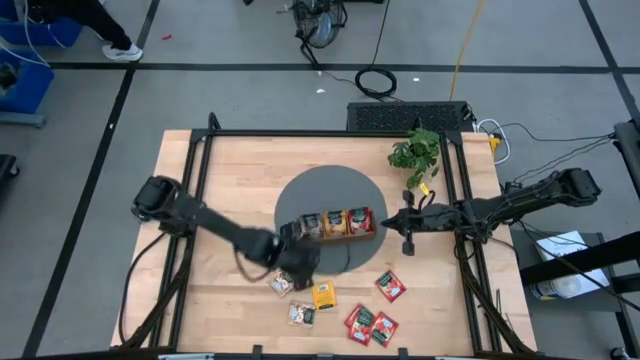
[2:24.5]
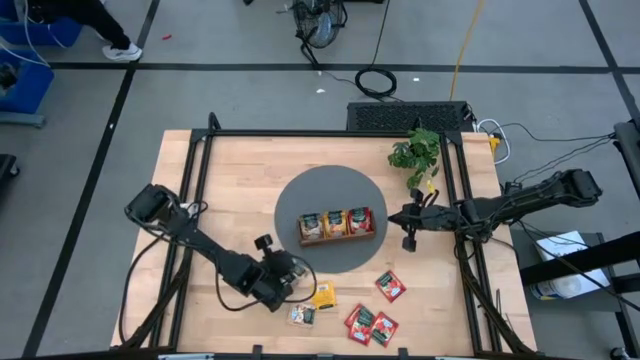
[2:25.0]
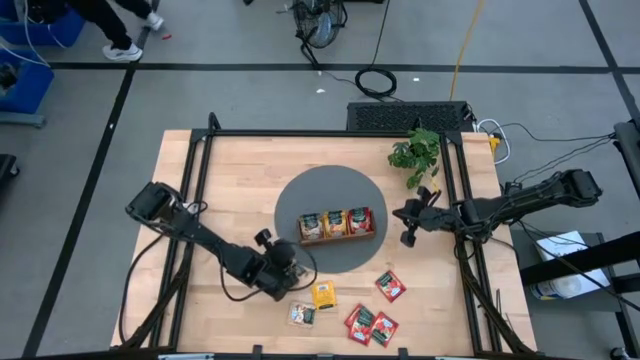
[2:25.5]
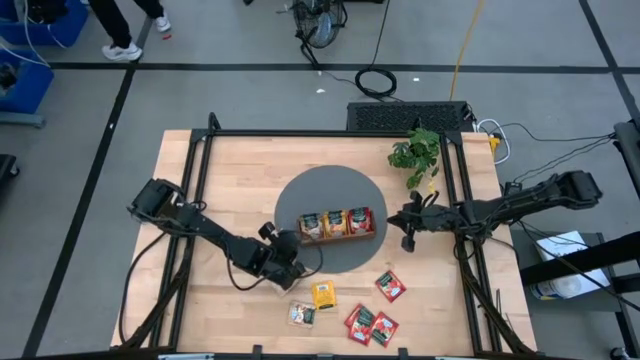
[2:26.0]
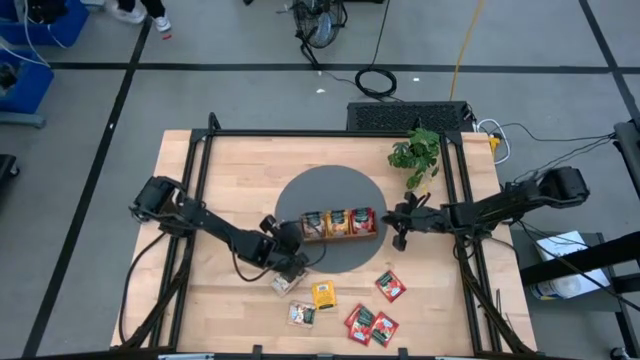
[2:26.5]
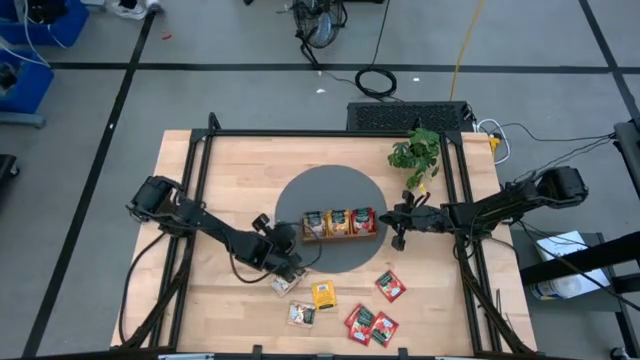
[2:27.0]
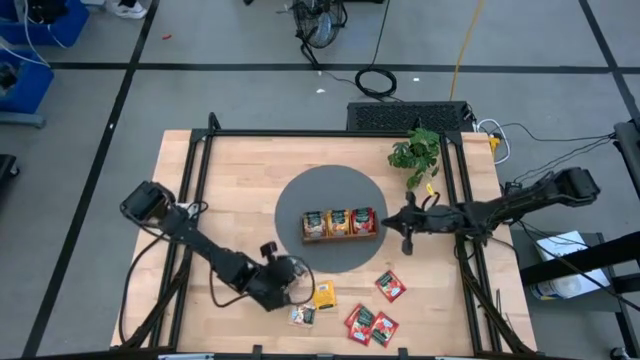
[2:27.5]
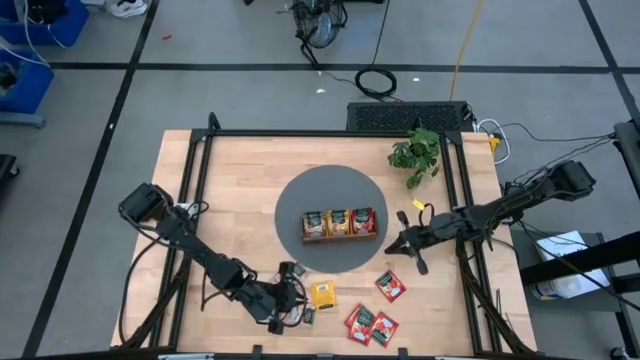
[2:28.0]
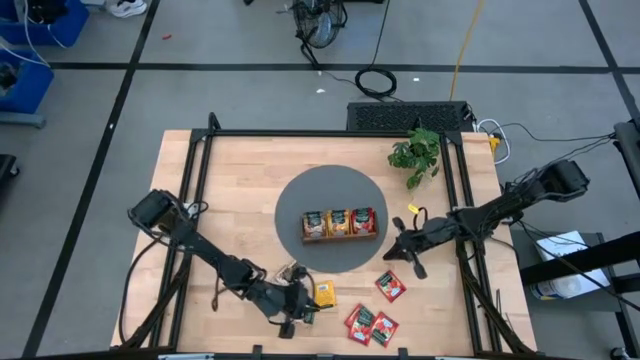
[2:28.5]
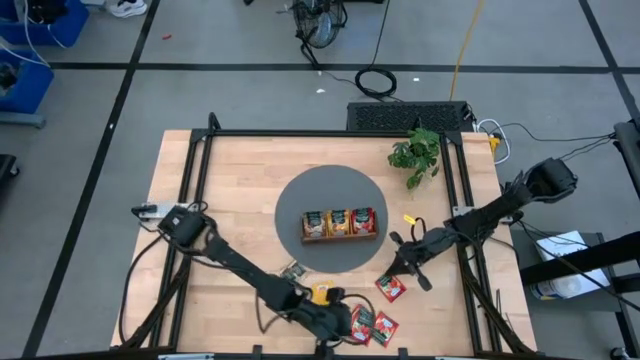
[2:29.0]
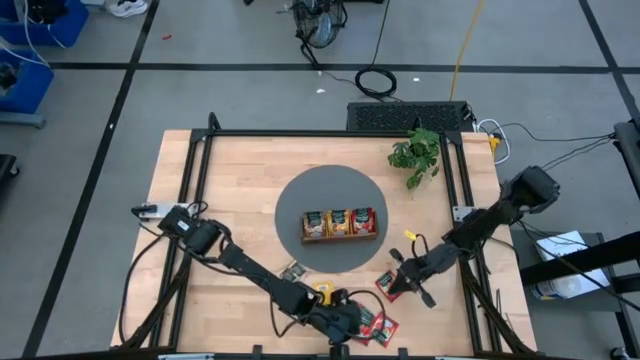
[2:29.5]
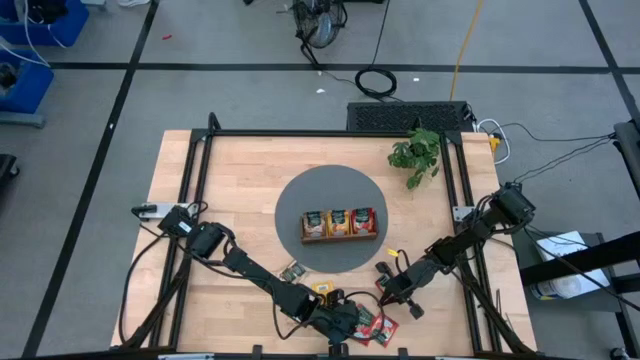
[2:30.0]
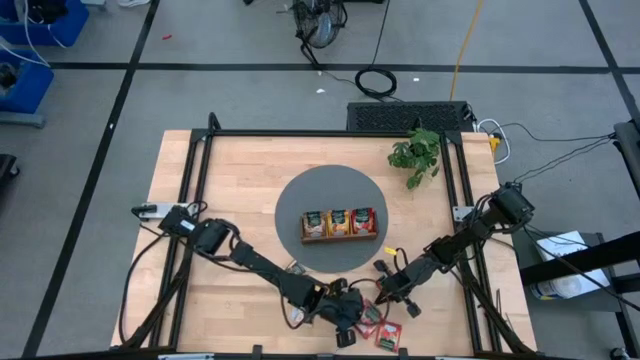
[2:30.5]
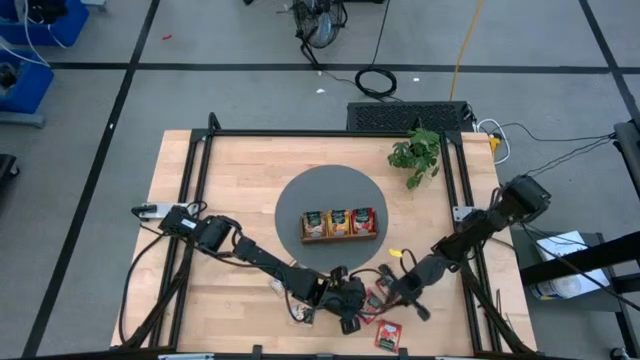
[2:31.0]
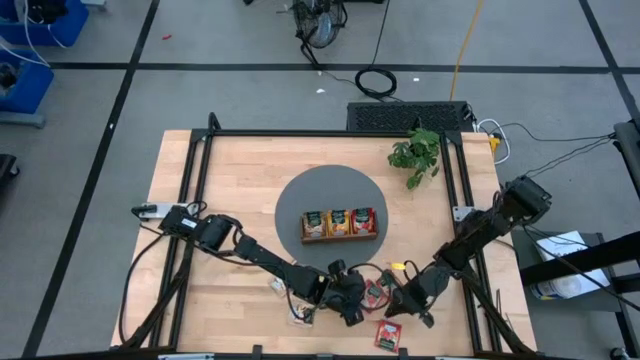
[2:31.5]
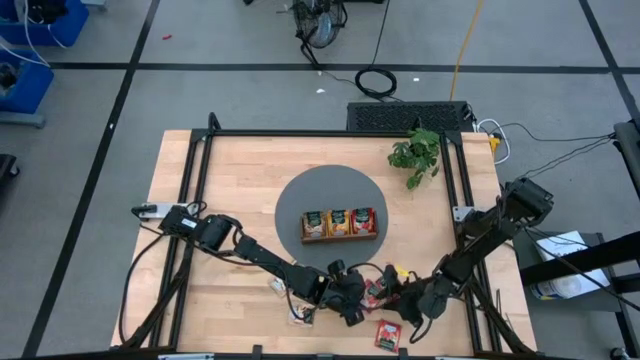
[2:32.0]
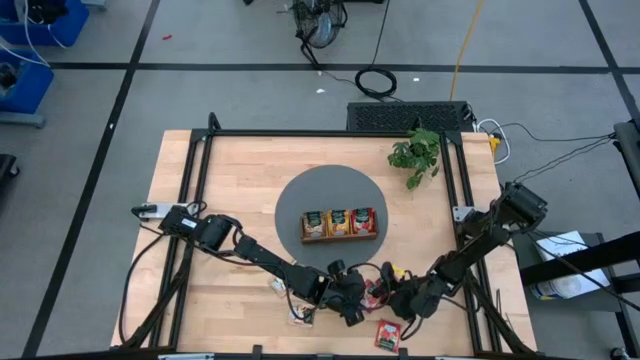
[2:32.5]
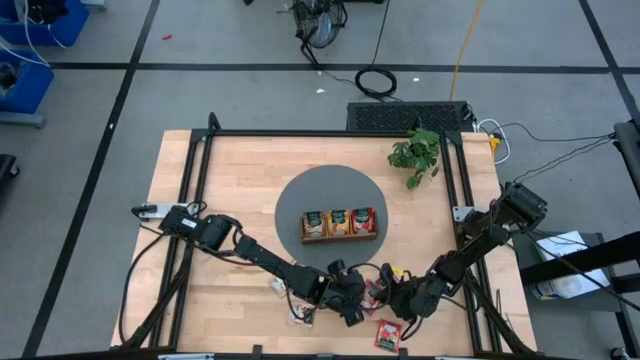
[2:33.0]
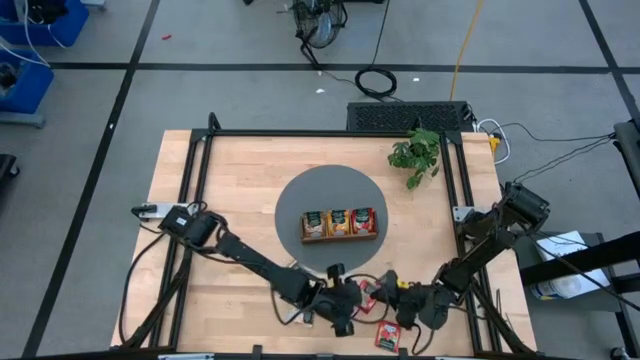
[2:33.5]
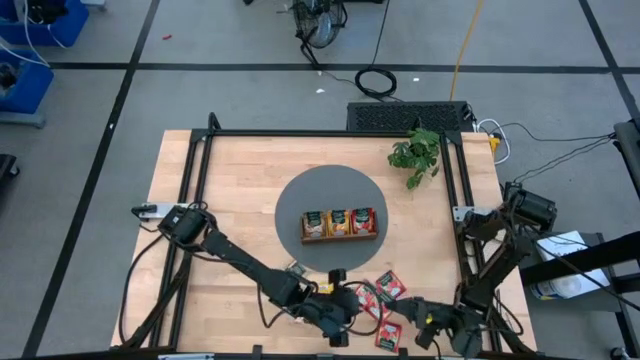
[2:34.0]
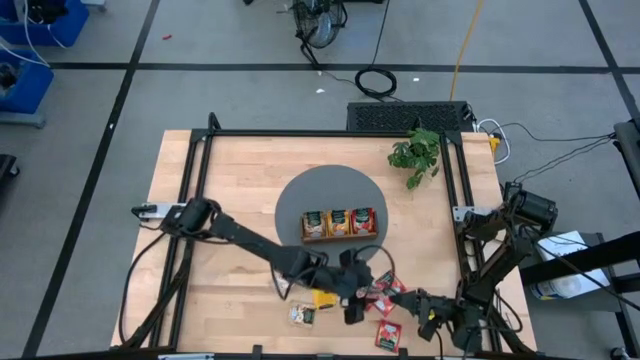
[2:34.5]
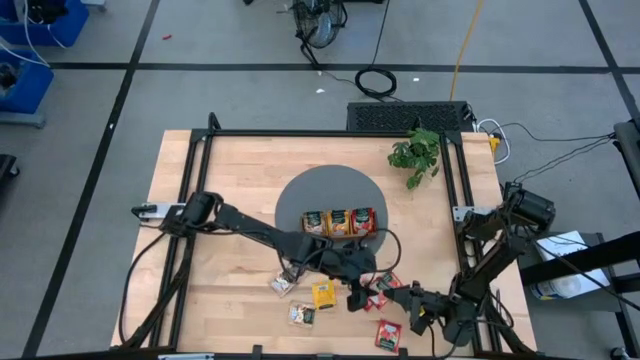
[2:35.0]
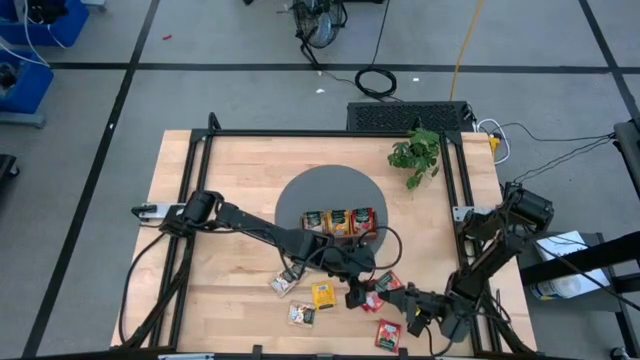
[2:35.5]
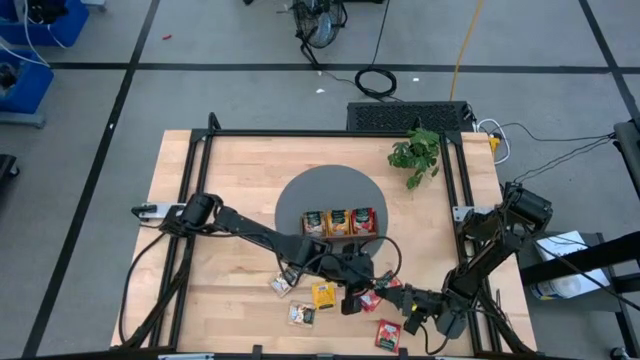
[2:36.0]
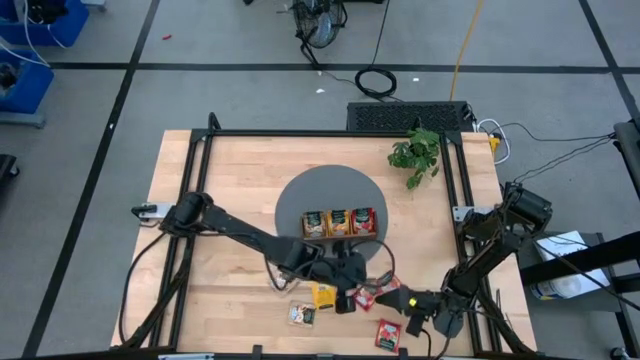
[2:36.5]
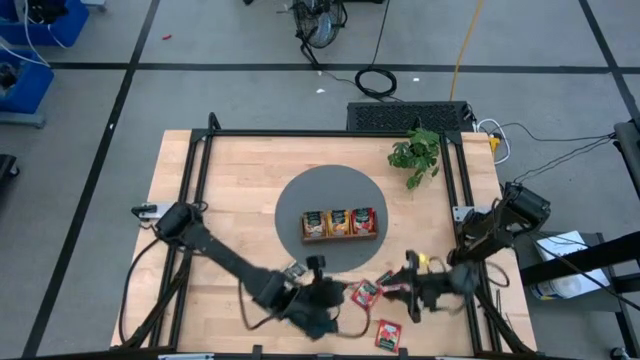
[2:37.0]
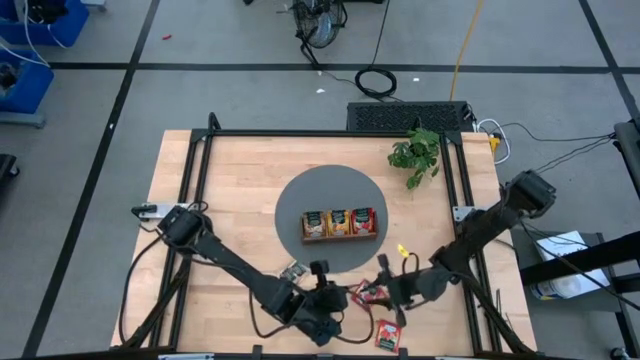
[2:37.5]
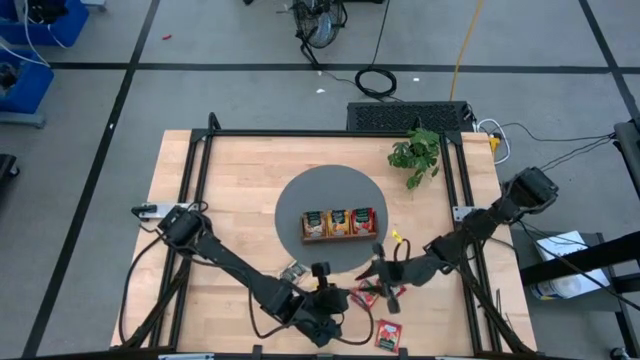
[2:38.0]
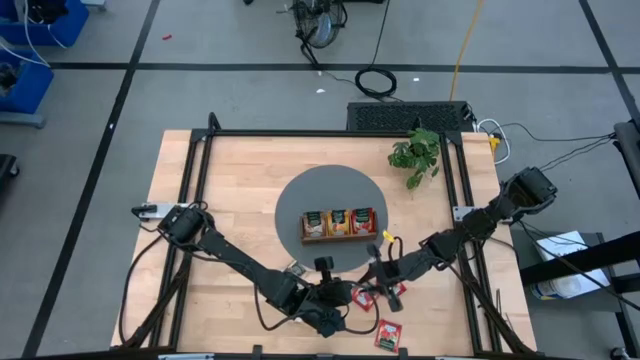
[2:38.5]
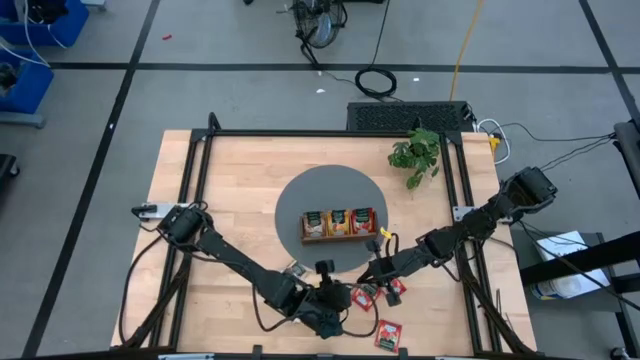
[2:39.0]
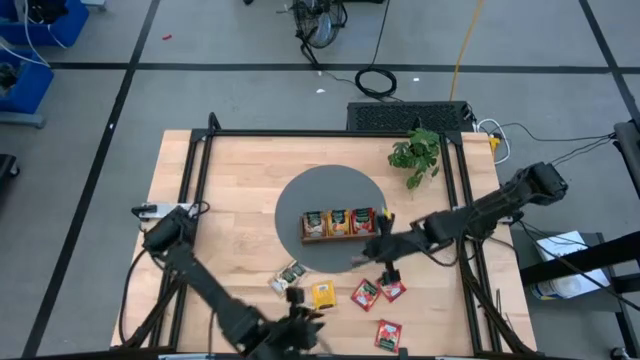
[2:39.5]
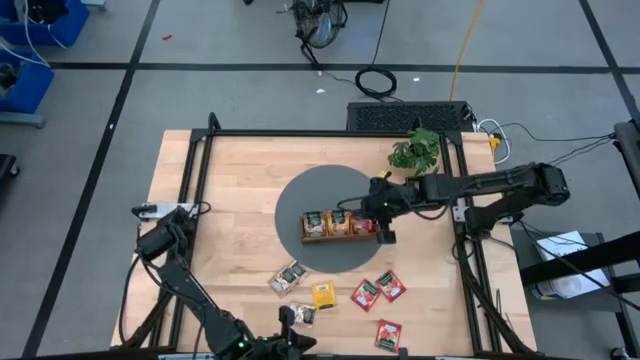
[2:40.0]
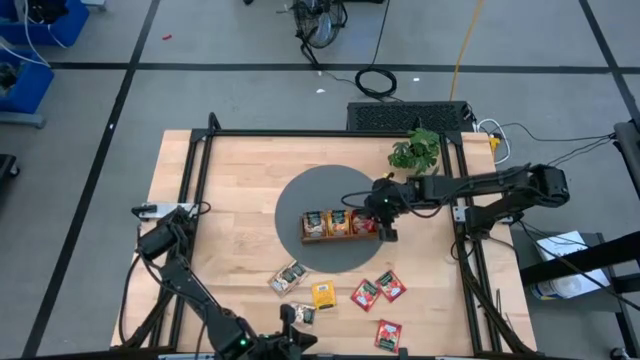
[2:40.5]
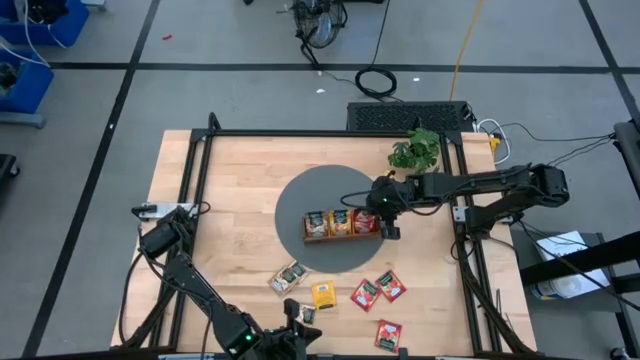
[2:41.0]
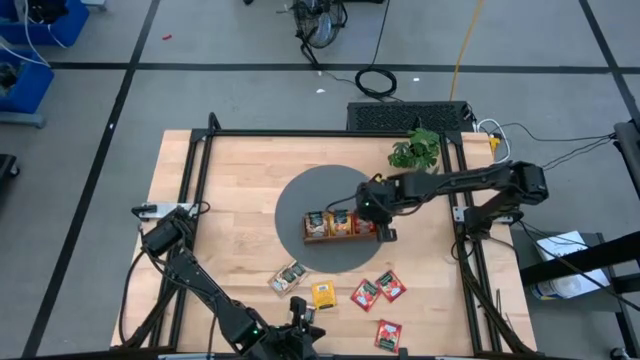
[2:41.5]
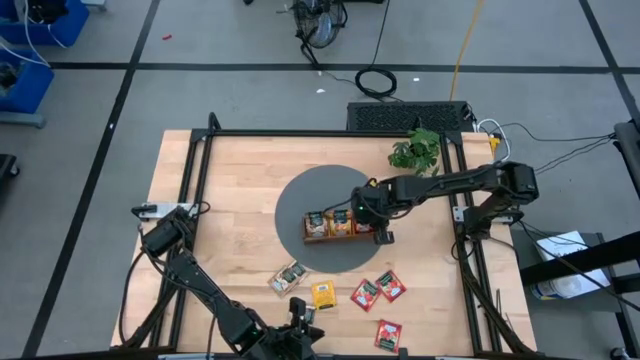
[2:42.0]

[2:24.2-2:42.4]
Task: Pick & Place Tea
Put the red tea bag into the right slot of the wooden organizer

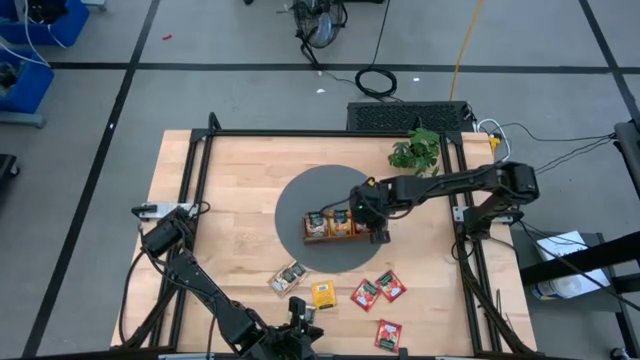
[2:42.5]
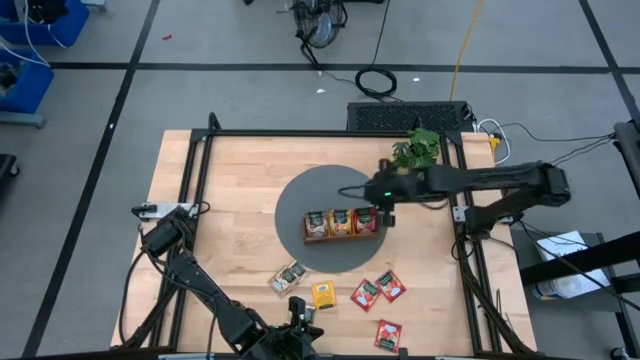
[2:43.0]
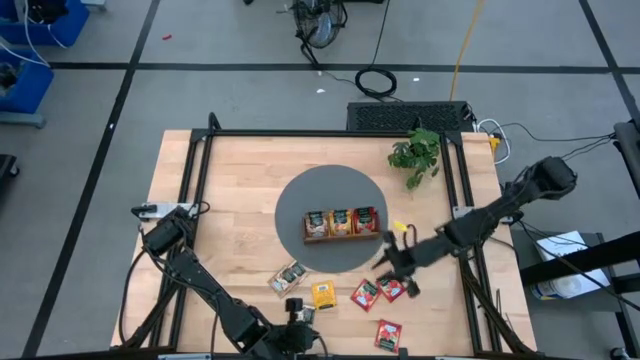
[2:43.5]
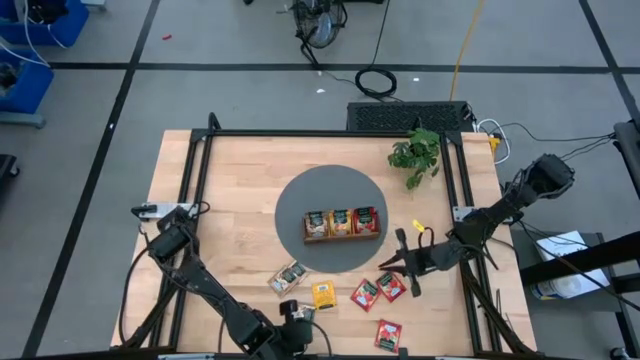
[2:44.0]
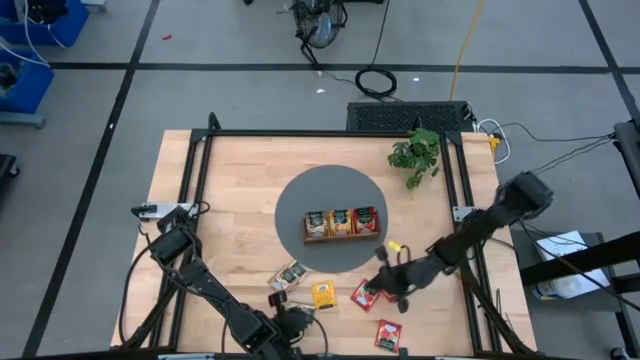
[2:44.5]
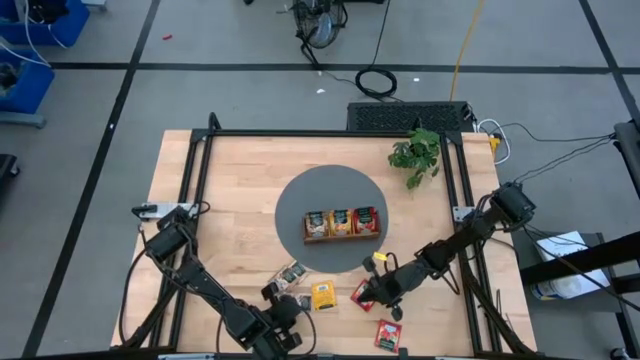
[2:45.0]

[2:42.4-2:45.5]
Adjust the brown tea bag on the table

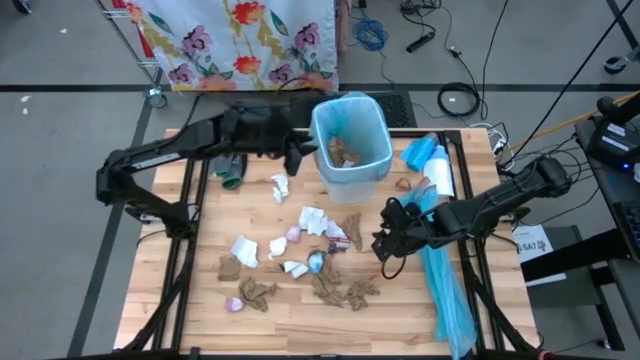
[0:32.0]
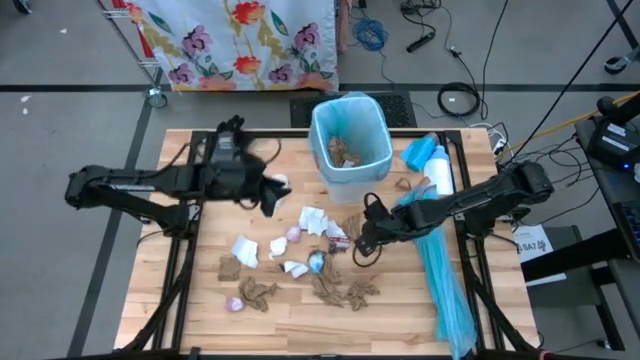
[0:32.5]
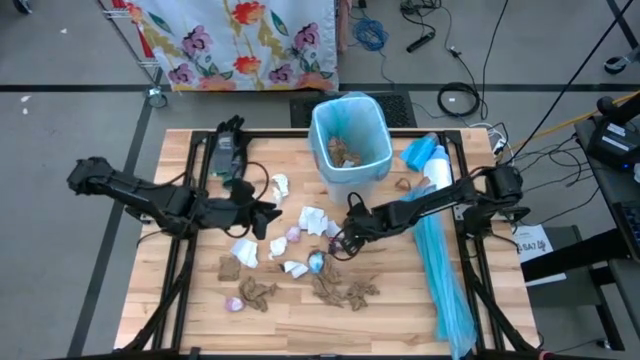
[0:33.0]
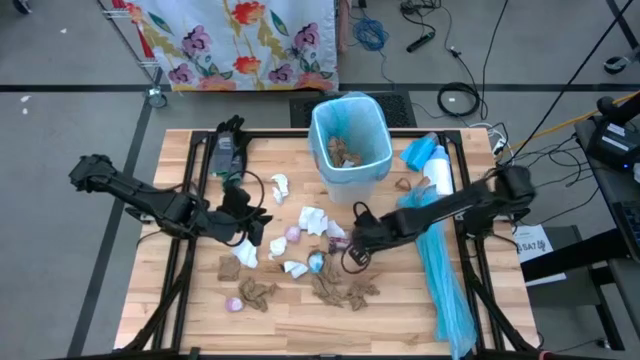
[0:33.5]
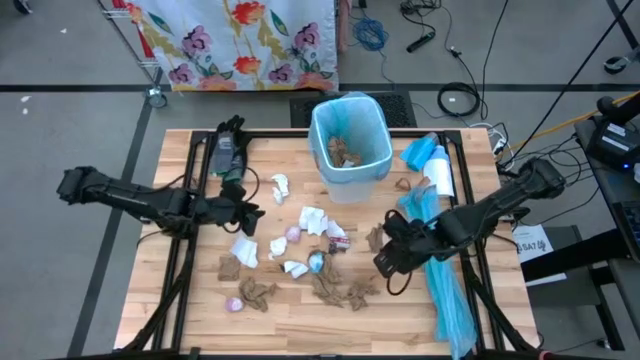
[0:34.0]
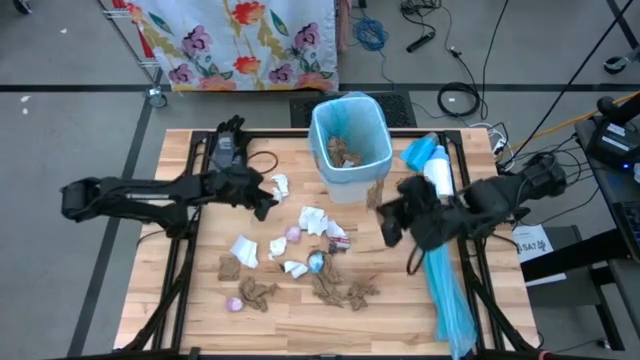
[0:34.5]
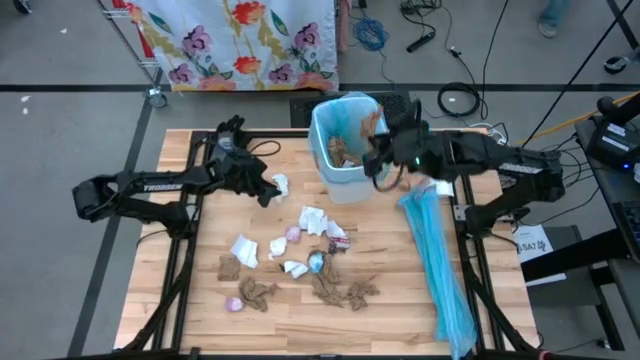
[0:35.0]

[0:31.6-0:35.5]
Task: place trash/remove bag and relplace
Put the brown napkin into the trash bin
